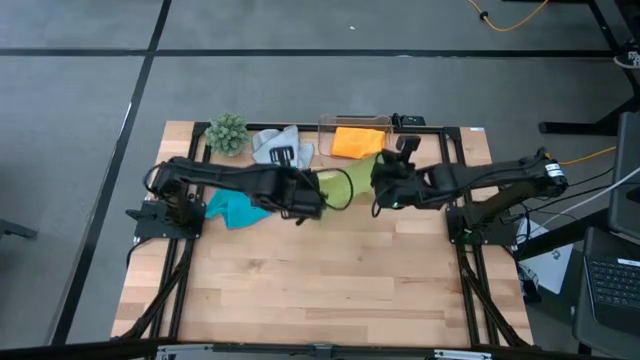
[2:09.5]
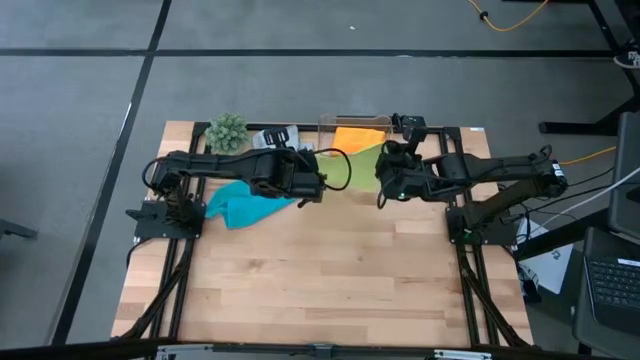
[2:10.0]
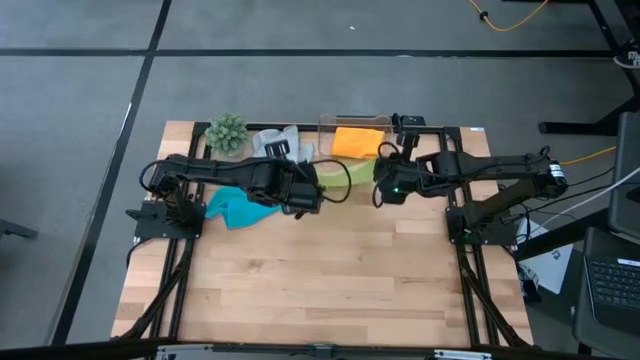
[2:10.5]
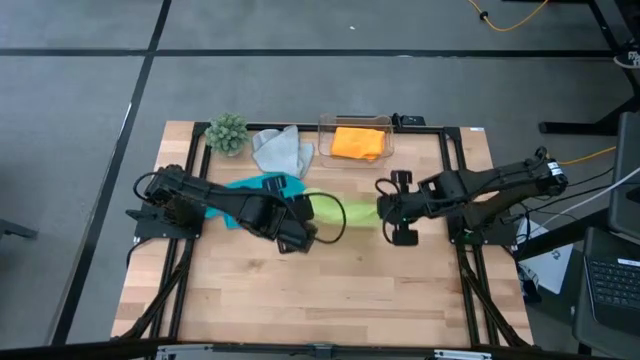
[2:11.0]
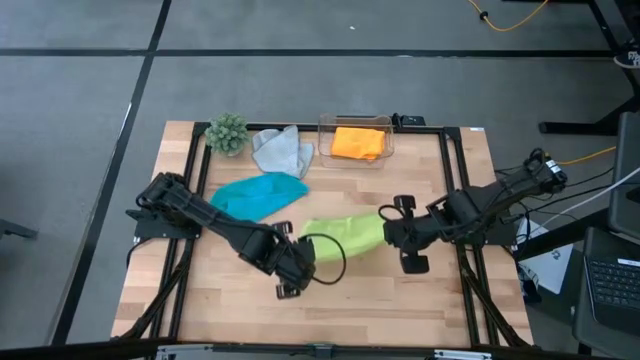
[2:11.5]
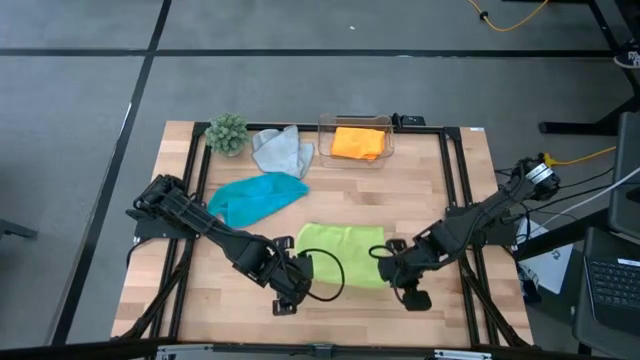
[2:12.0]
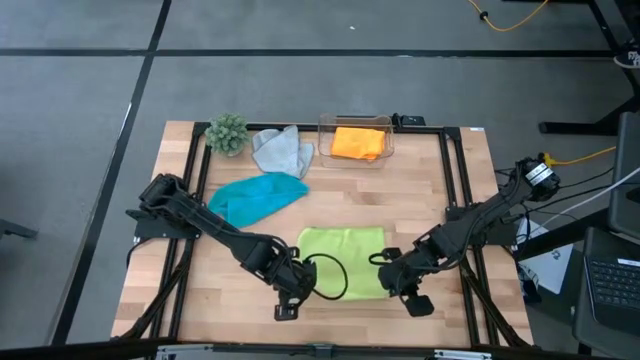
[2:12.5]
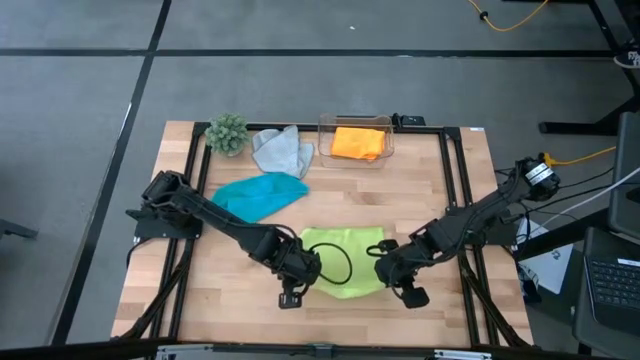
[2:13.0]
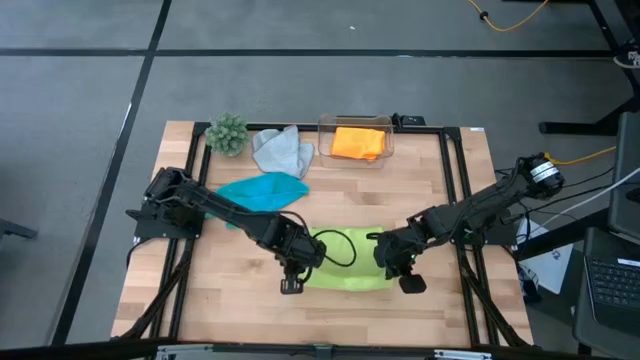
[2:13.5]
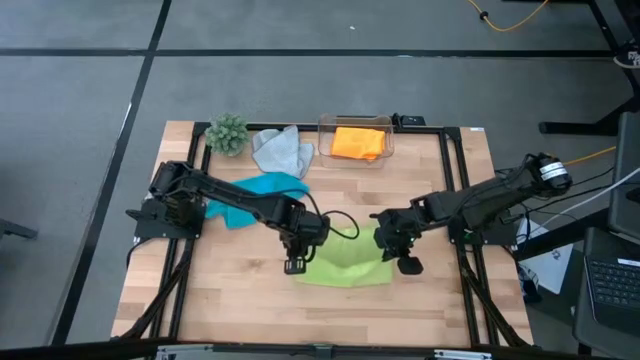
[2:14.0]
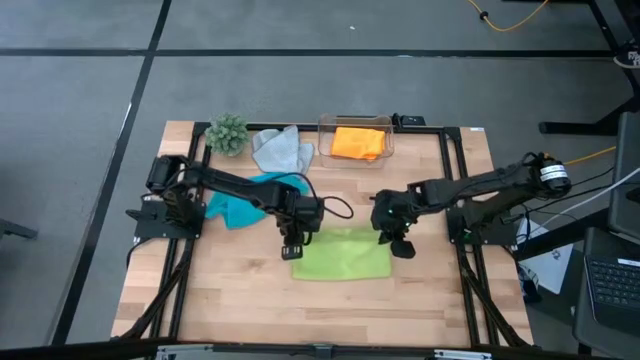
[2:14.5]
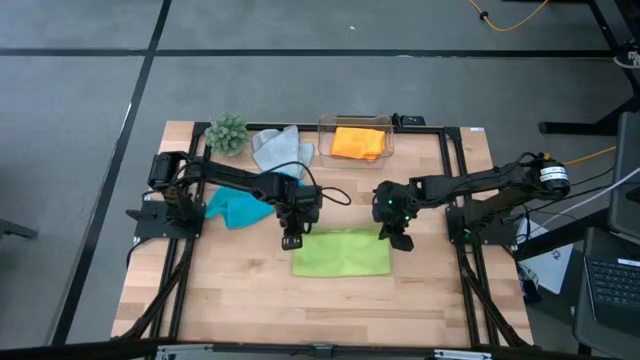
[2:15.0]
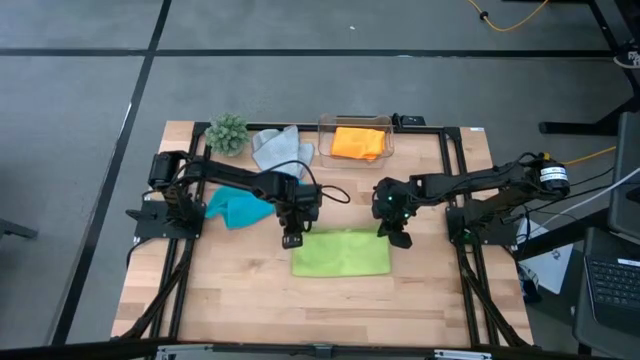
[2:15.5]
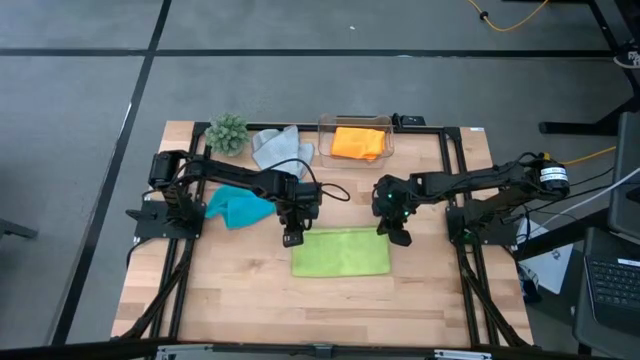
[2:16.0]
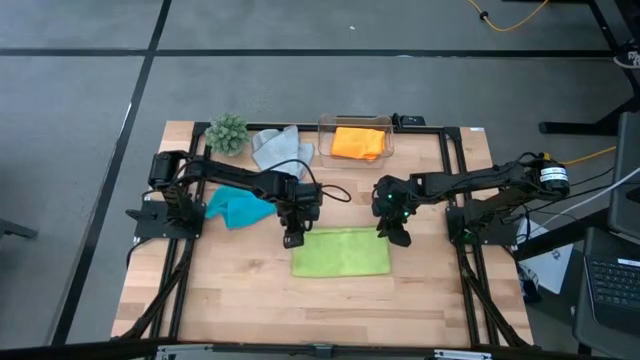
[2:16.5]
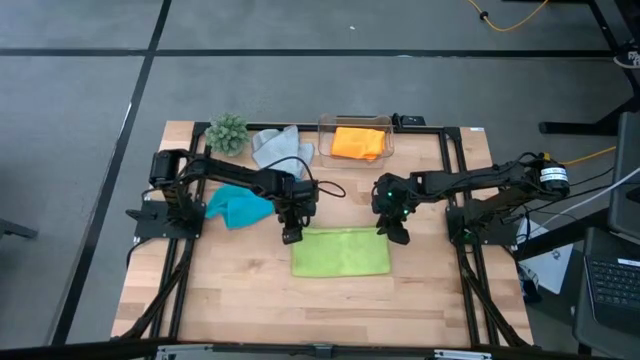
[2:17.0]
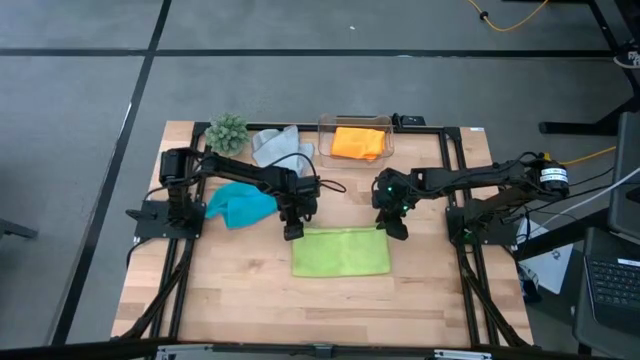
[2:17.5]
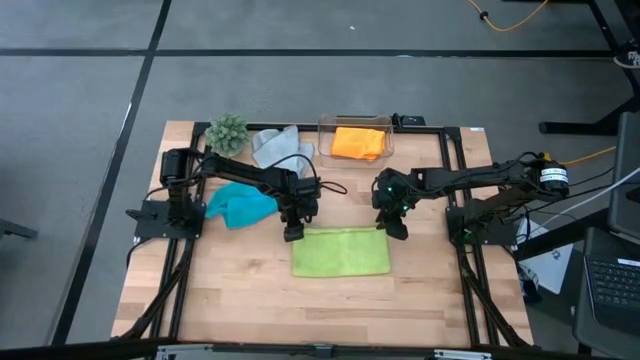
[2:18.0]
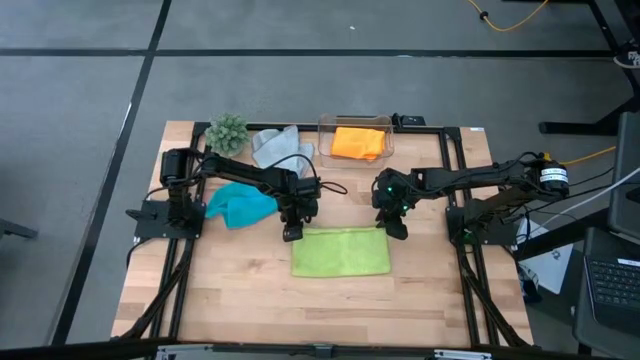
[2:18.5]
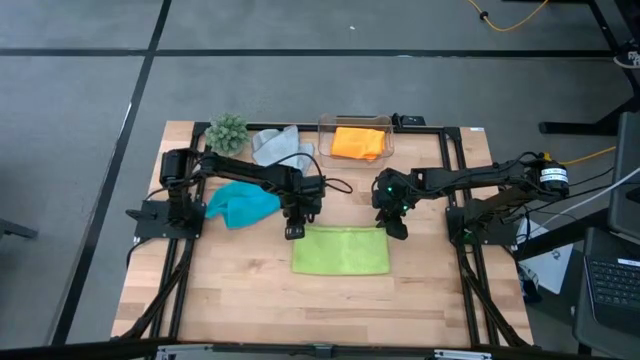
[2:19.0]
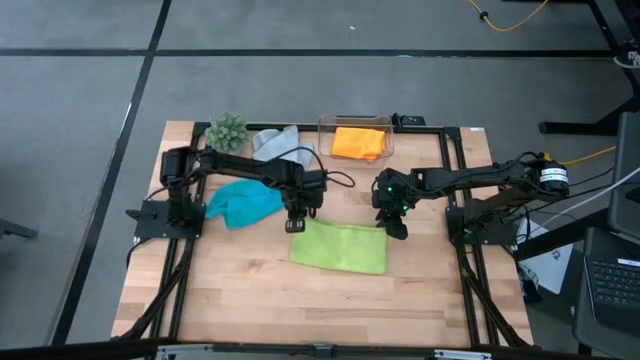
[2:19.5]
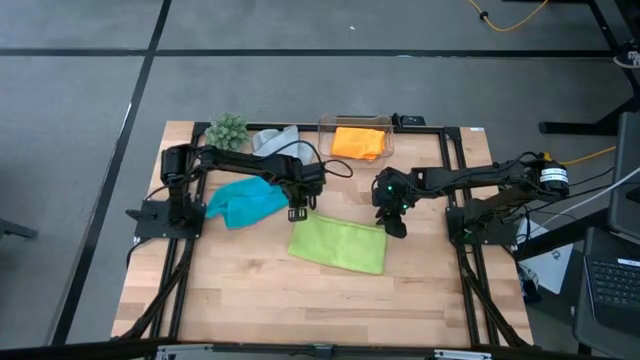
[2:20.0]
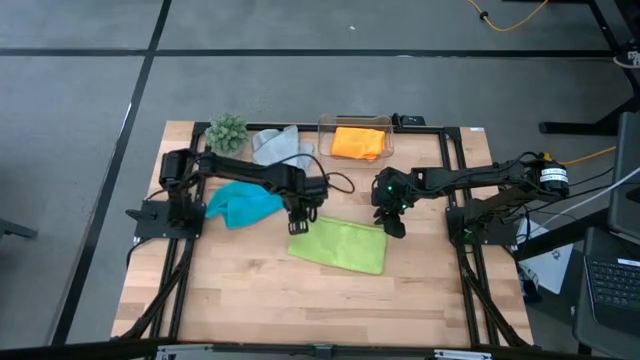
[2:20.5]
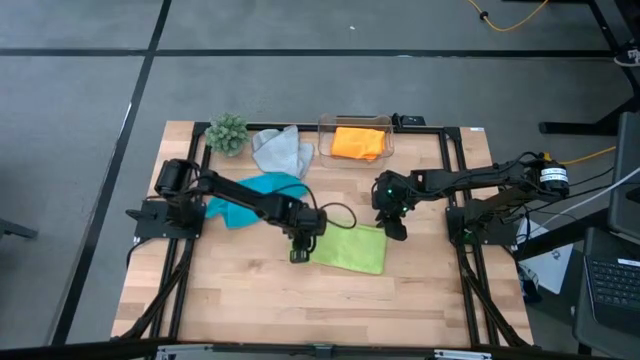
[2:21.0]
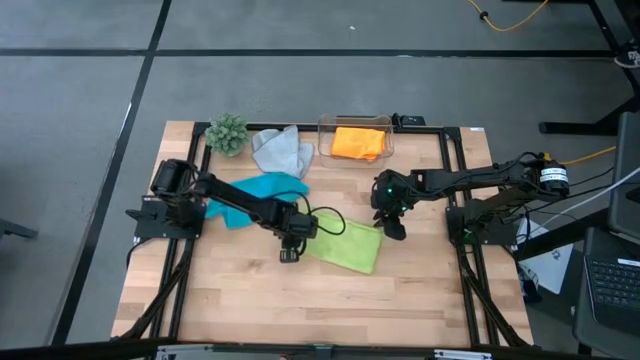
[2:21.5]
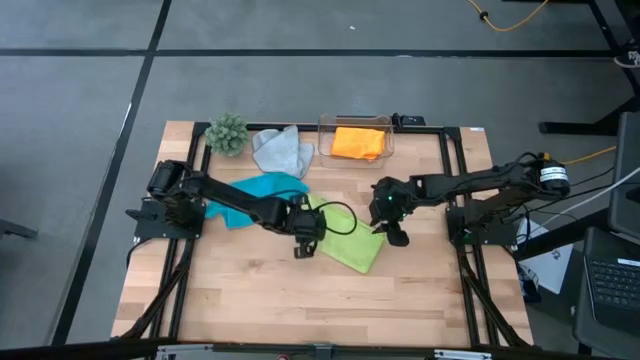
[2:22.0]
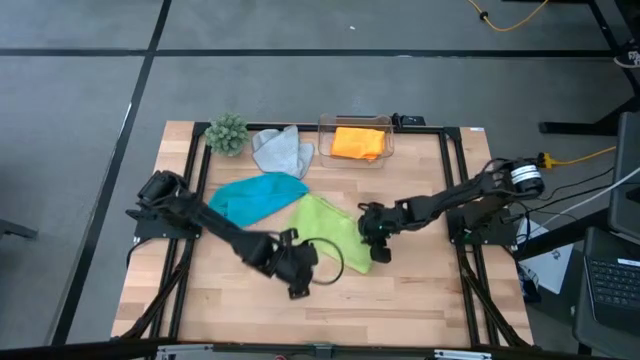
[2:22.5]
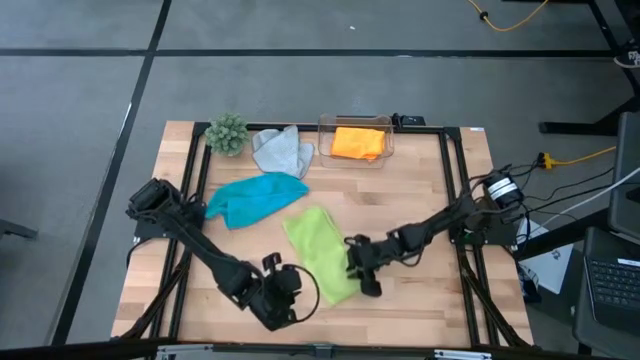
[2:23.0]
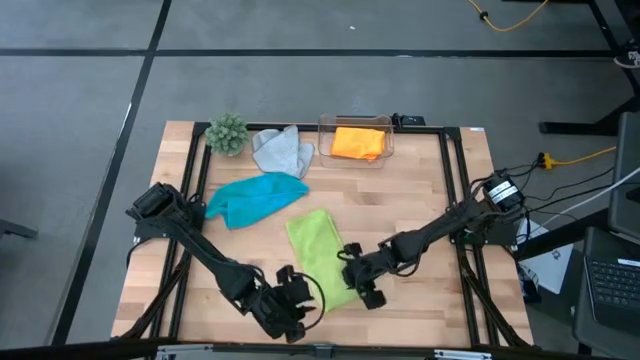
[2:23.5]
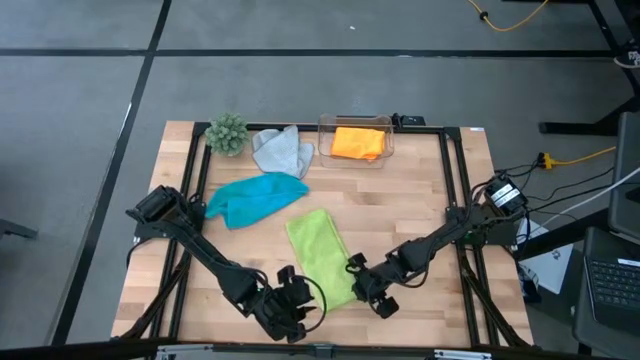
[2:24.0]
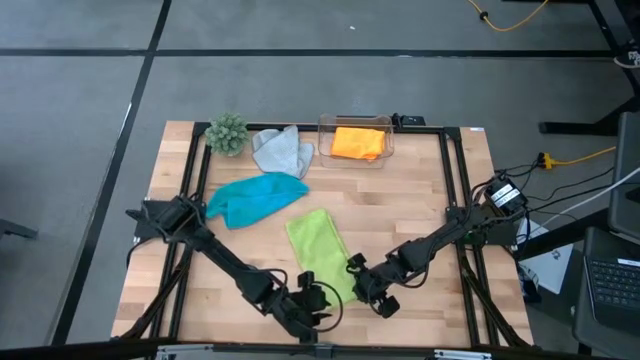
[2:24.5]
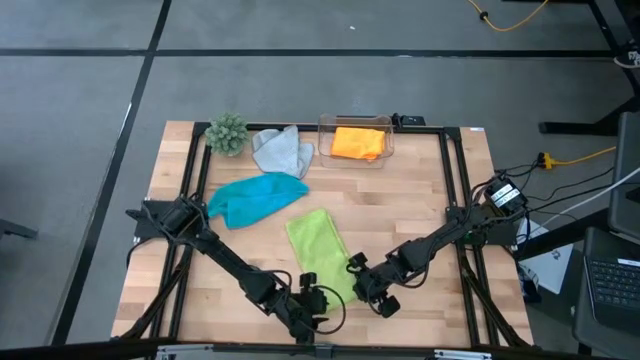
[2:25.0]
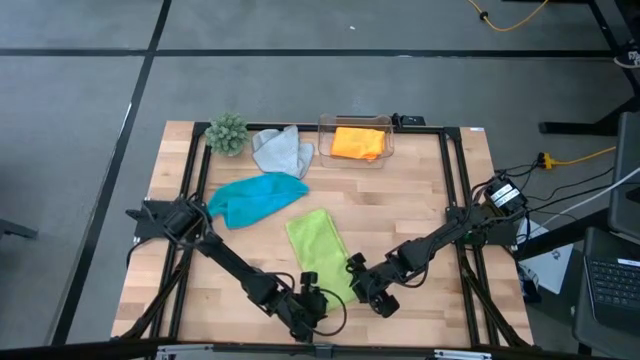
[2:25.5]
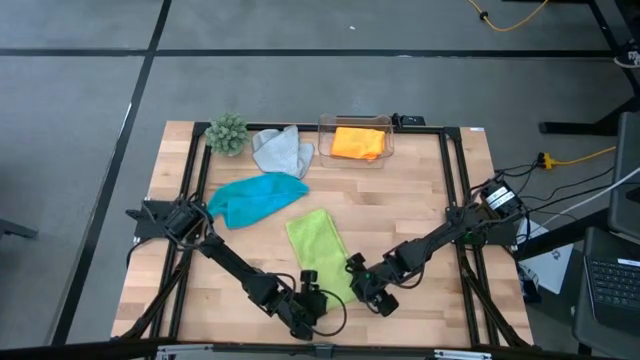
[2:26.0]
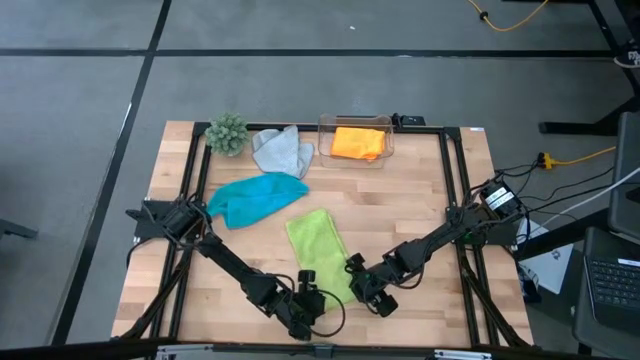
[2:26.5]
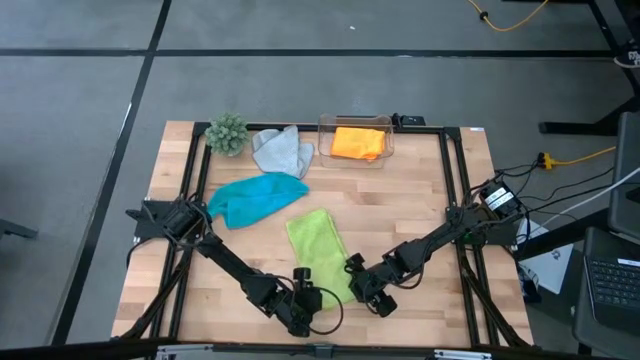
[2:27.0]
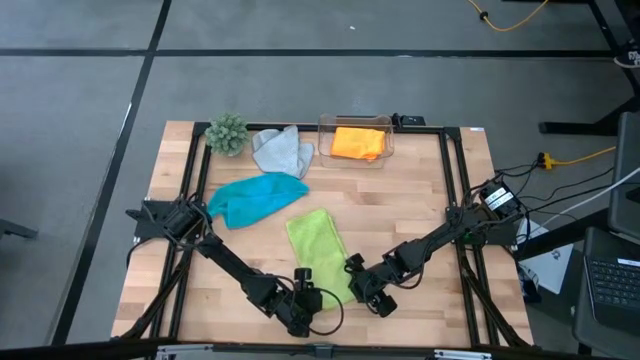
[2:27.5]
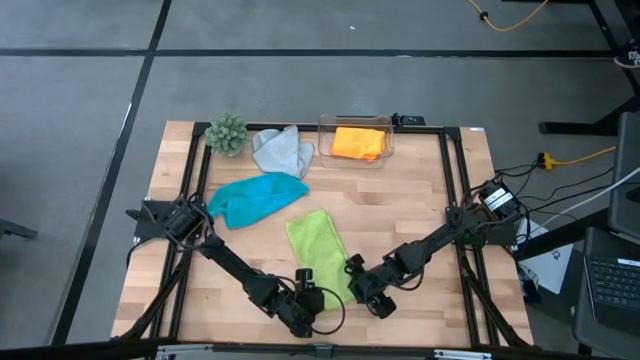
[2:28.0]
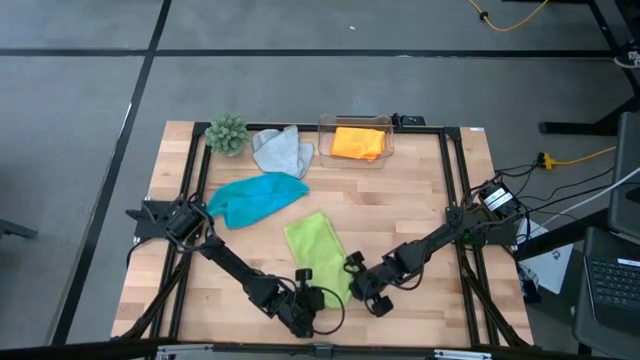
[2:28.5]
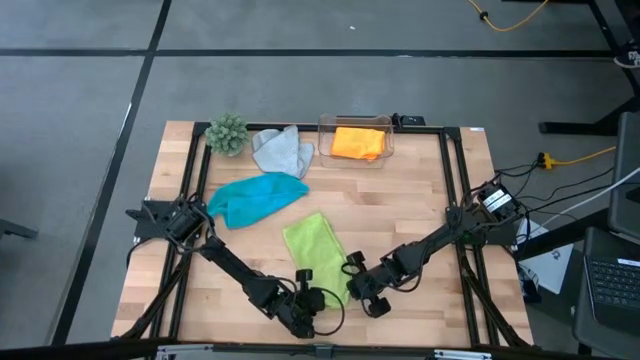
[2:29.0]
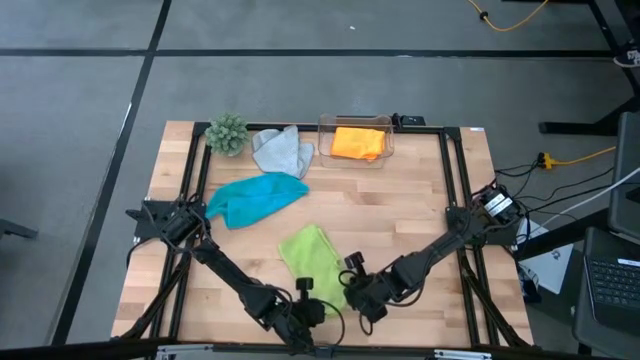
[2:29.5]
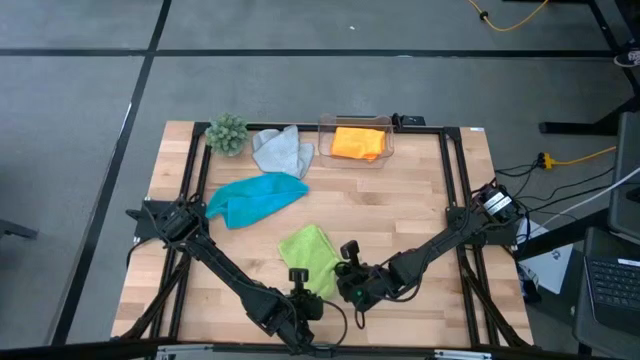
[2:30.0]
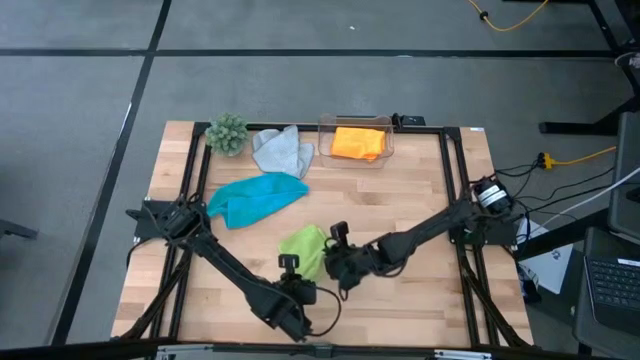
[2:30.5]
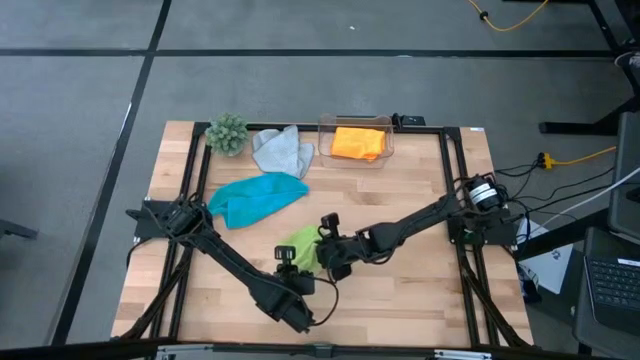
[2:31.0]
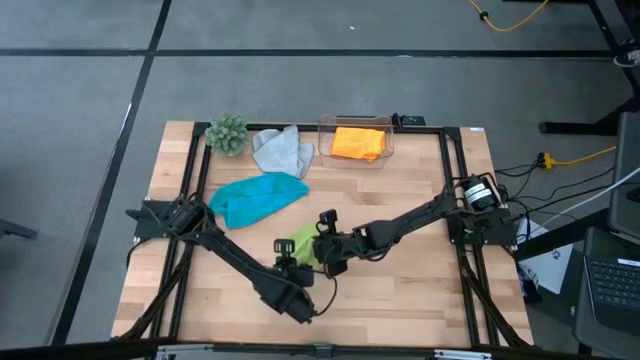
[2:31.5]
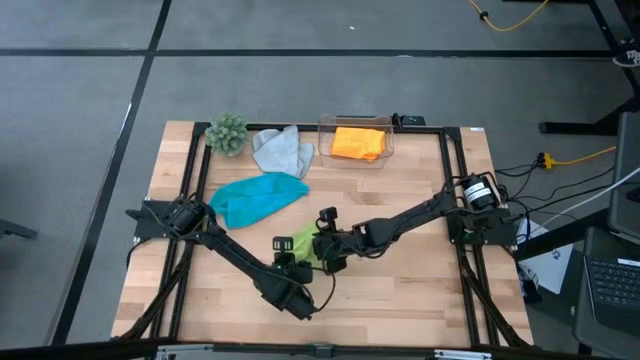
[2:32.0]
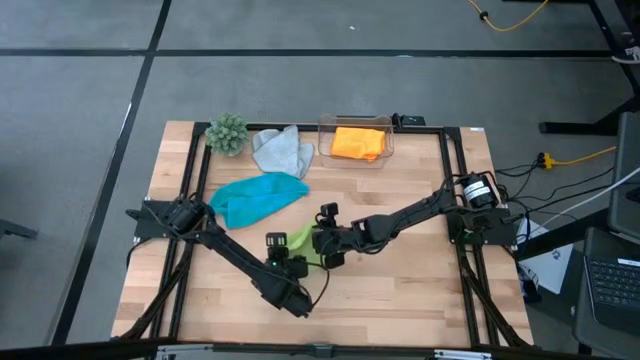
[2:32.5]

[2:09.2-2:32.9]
Task: Fold microfiber towels
Fold the green microfiber cloth
